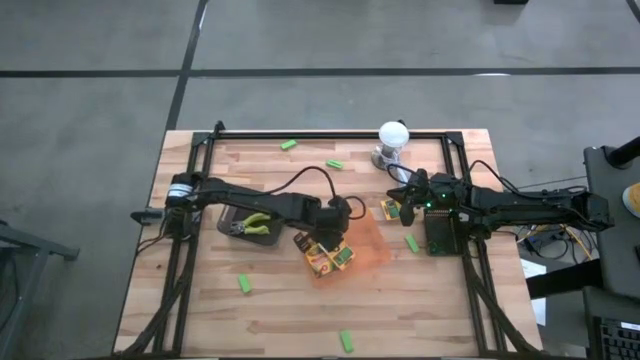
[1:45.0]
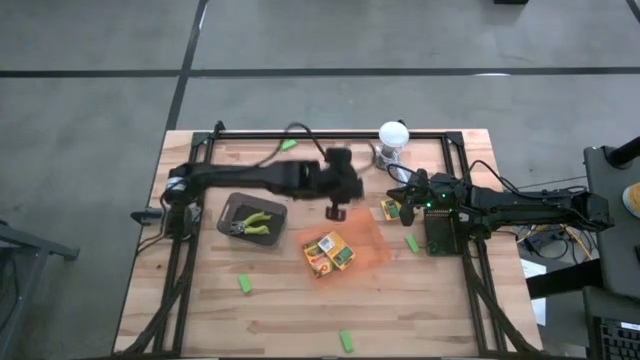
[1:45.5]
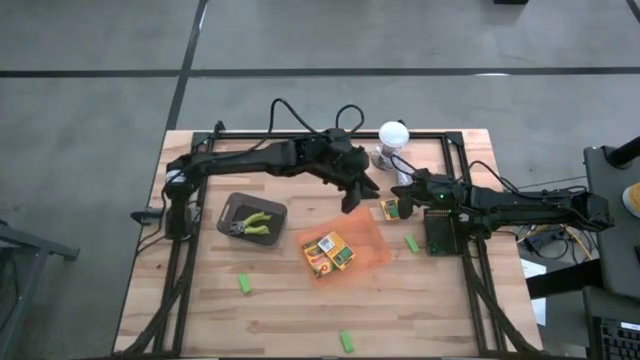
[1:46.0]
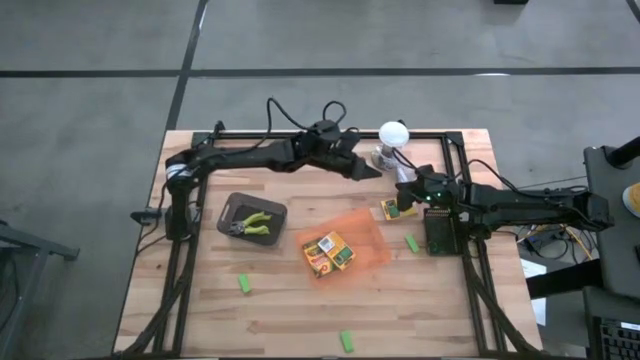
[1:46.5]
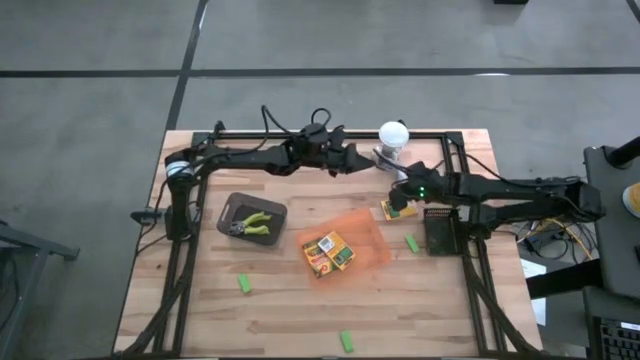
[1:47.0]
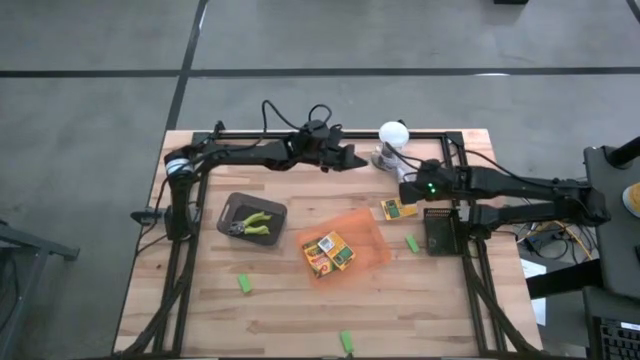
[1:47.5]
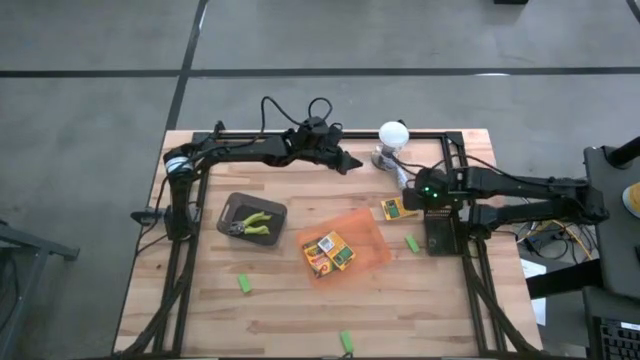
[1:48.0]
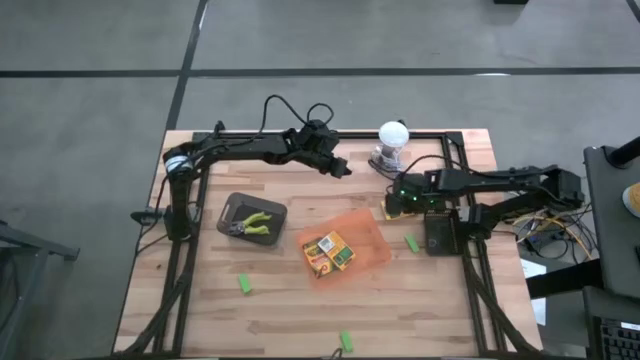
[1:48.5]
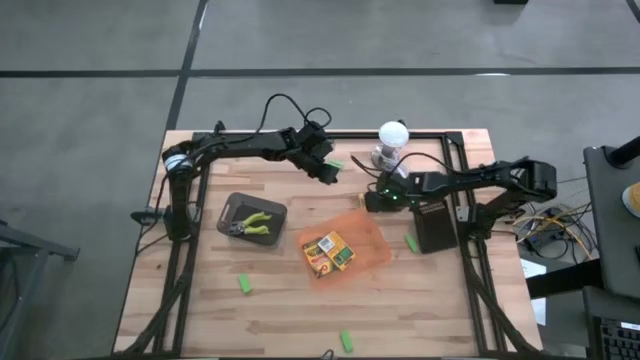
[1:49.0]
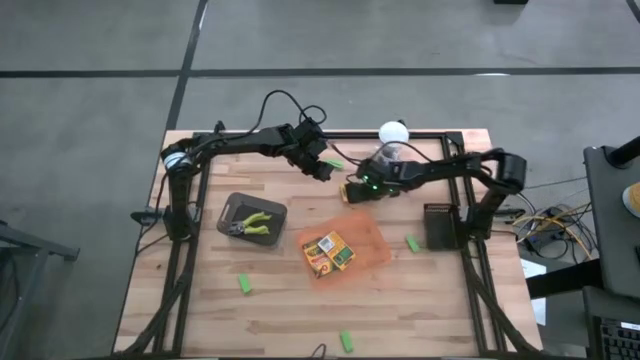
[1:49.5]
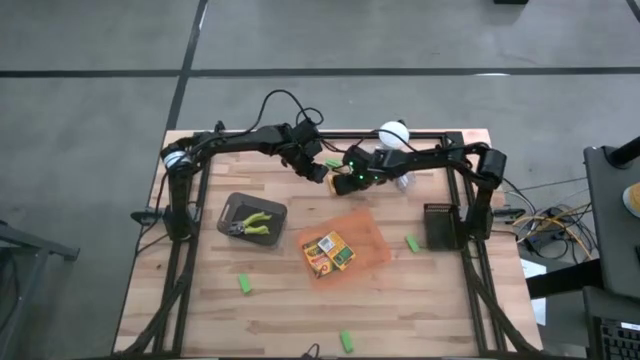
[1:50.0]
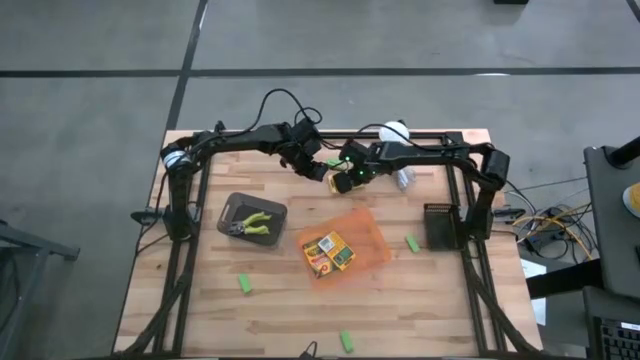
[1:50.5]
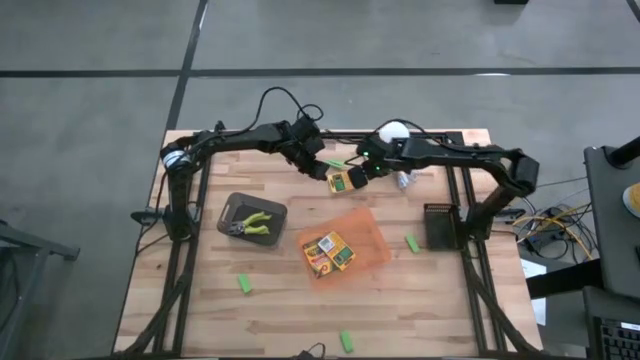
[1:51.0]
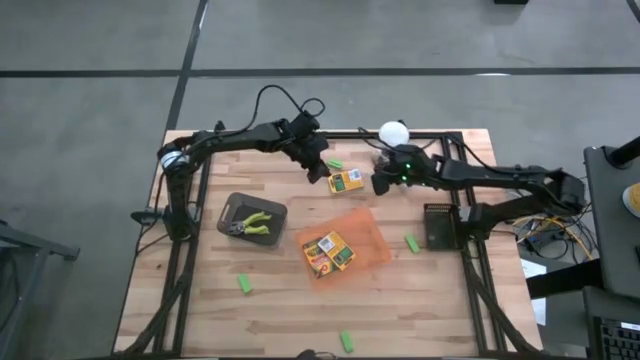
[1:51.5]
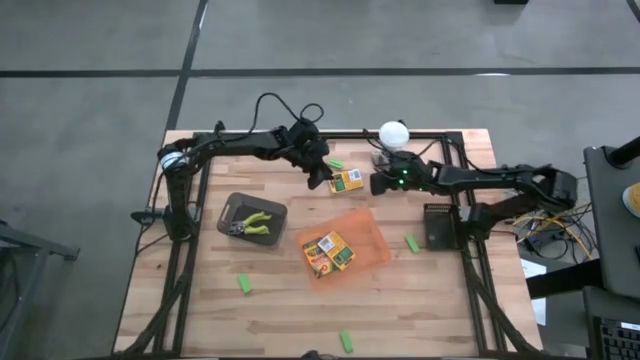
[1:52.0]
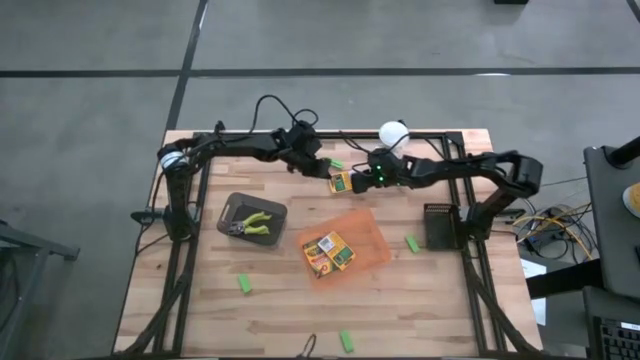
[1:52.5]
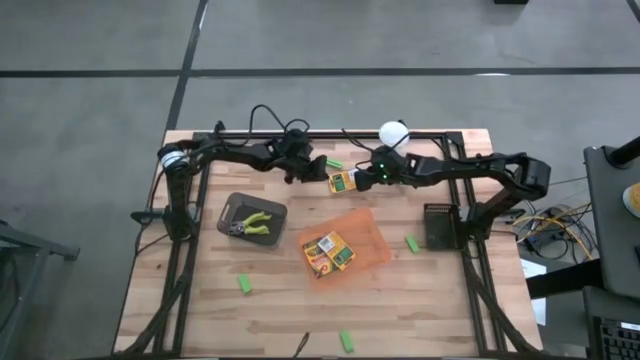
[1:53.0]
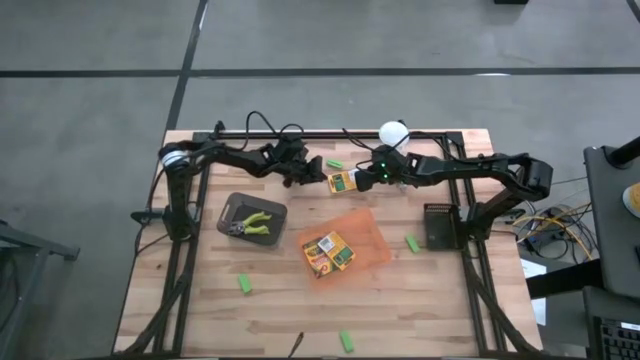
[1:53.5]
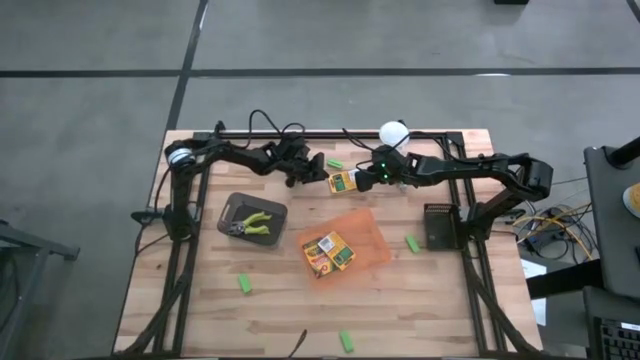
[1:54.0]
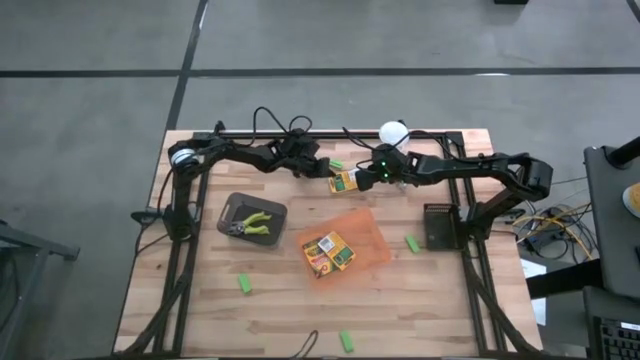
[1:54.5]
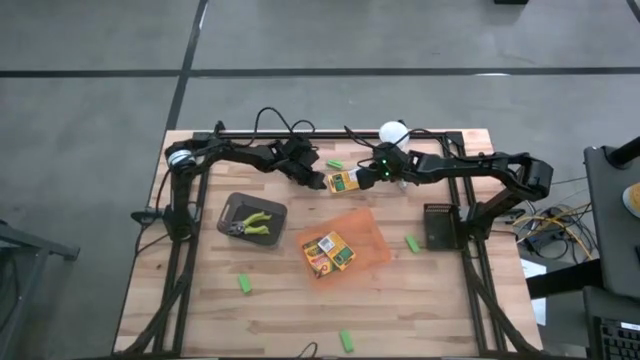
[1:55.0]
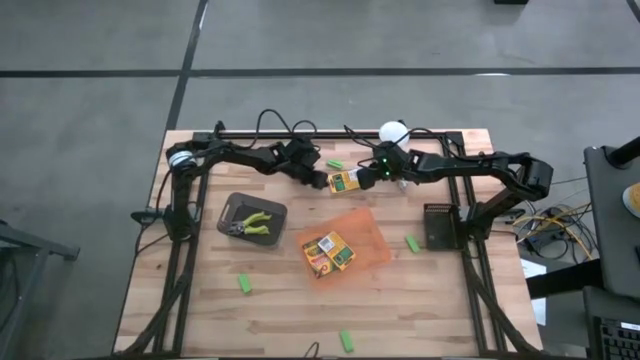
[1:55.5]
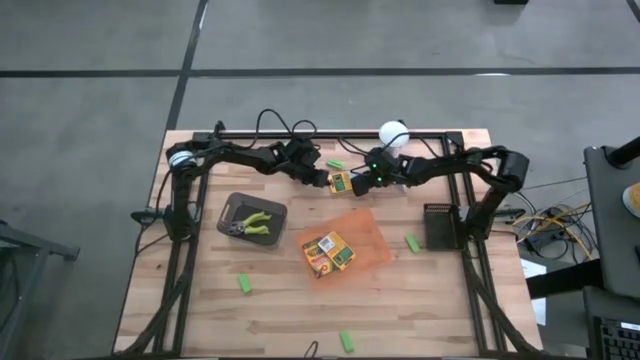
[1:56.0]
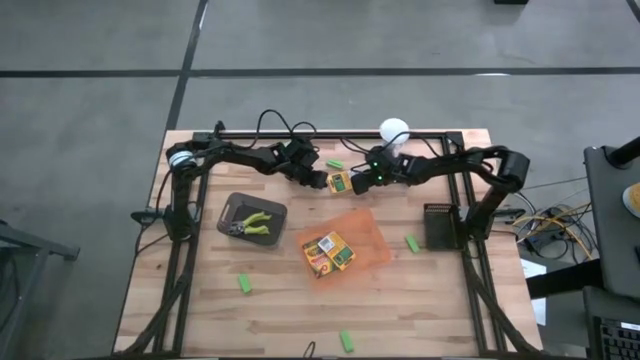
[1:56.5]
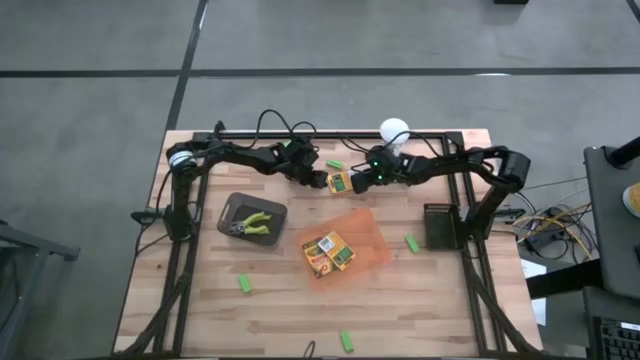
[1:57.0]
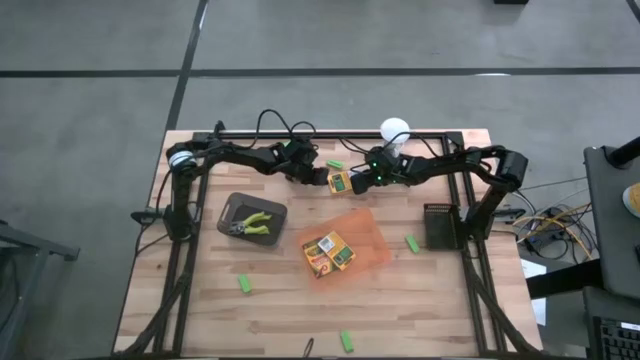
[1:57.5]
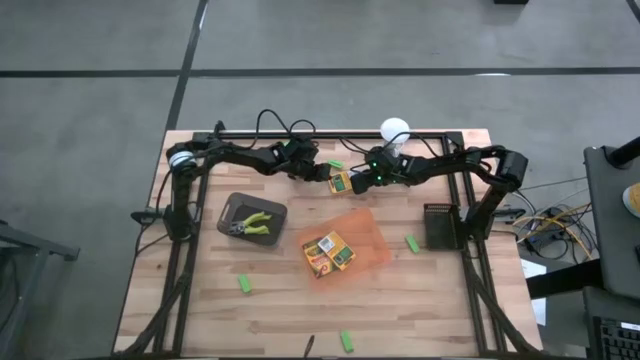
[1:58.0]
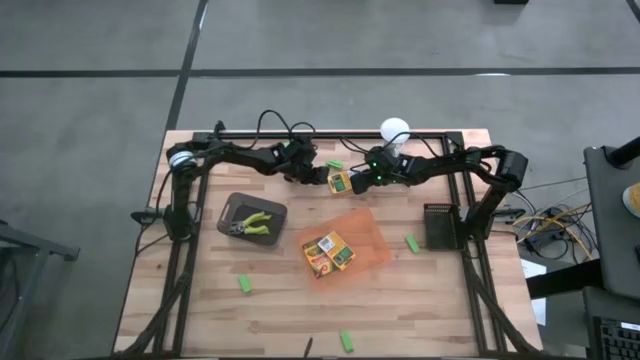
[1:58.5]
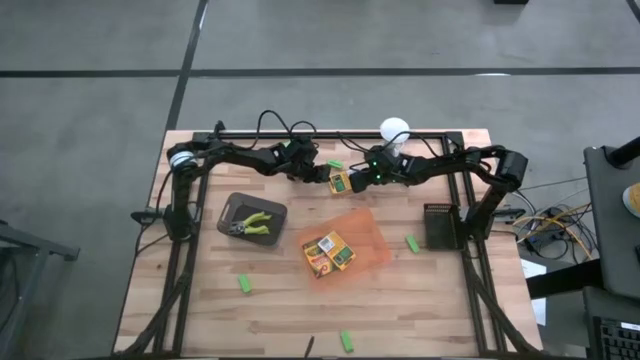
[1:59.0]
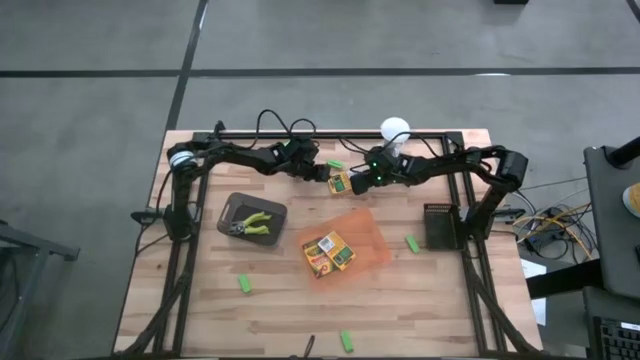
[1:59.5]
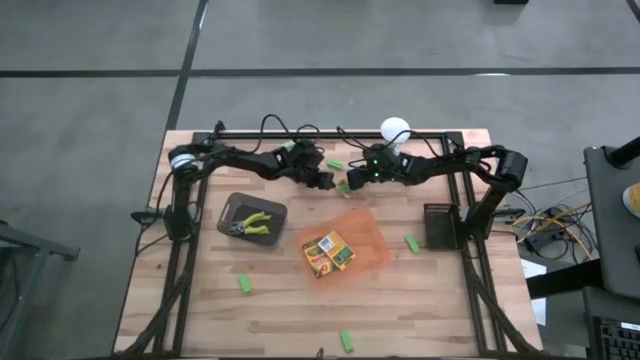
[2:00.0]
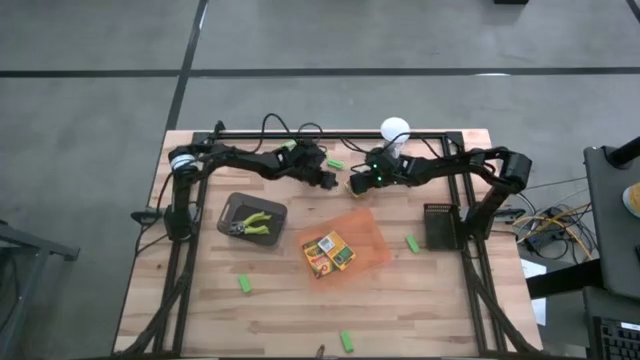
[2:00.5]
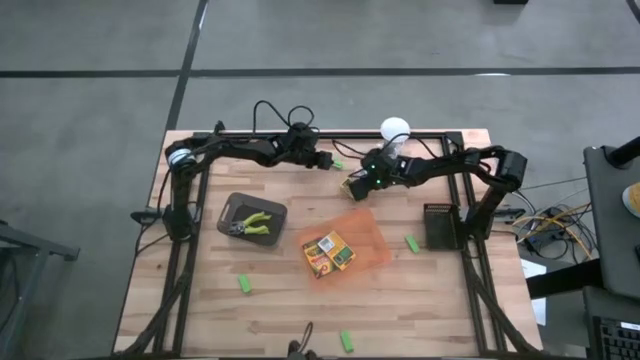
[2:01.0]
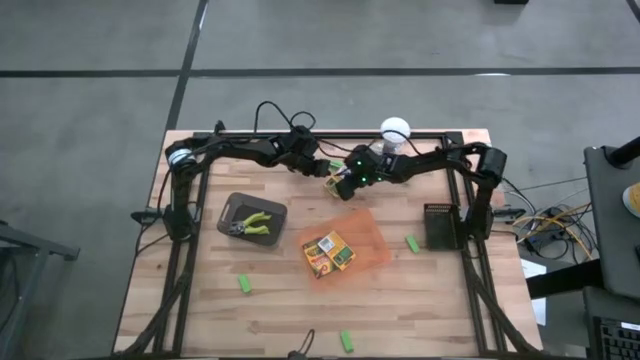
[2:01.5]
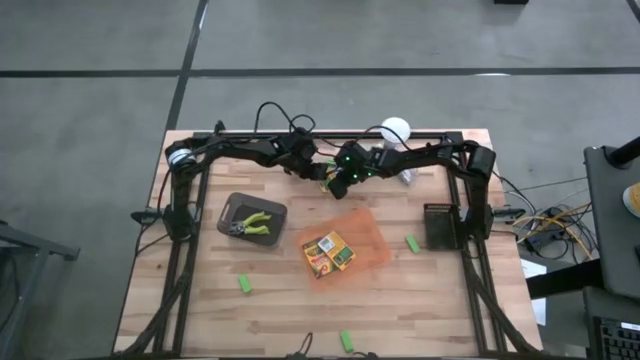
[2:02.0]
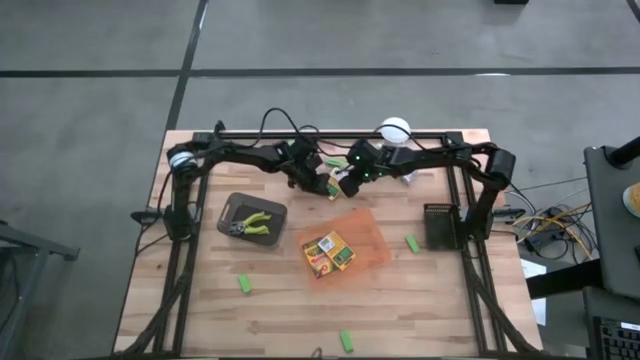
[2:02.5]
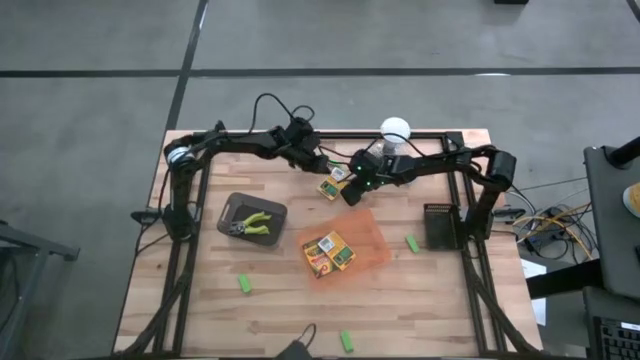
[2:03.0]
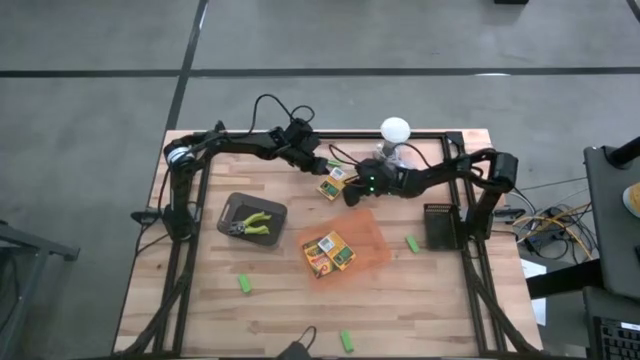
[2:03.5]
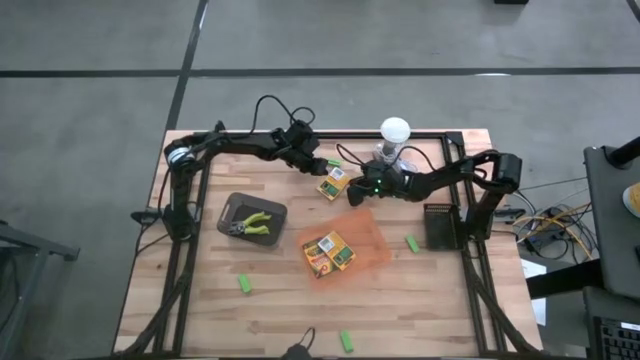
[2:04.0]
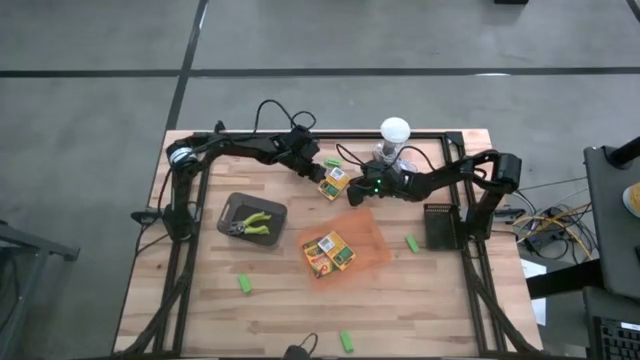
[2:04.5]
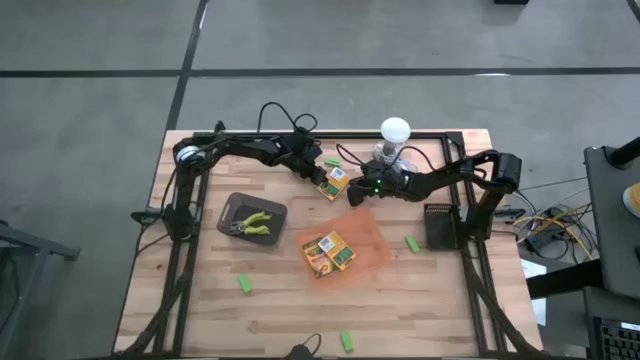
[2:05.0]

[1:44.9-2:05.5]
Task: Pick & Place School Supplies
Put the crayon box into the orange bin

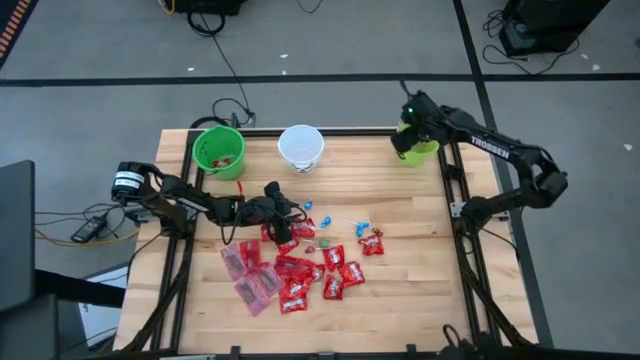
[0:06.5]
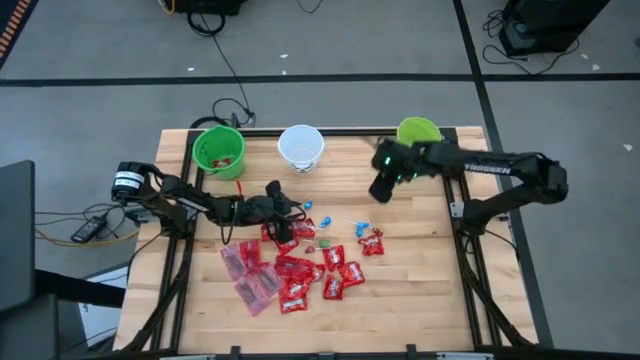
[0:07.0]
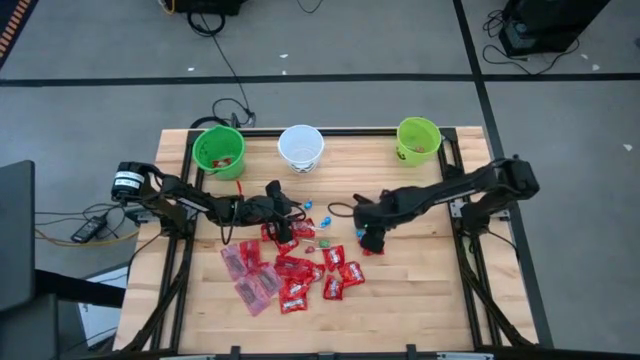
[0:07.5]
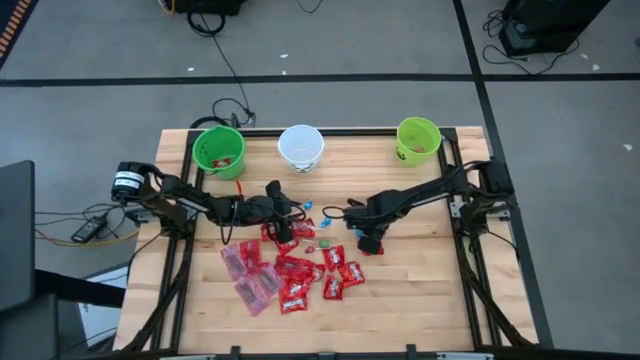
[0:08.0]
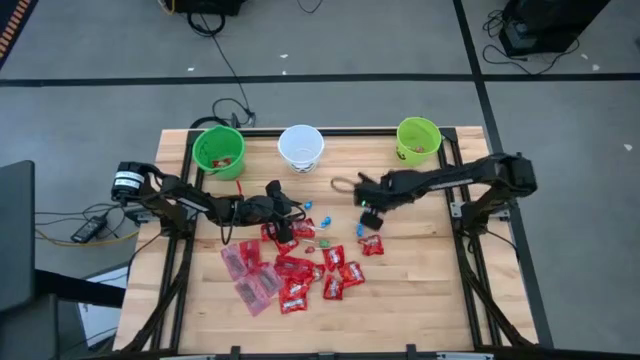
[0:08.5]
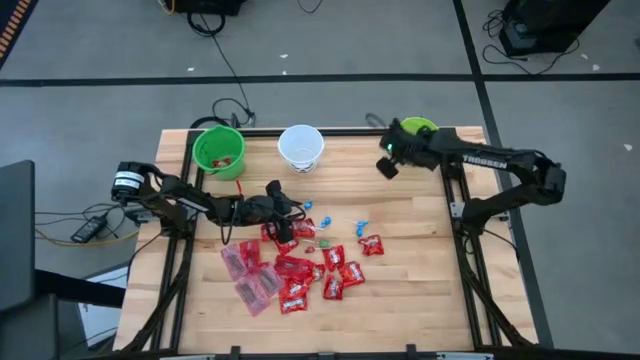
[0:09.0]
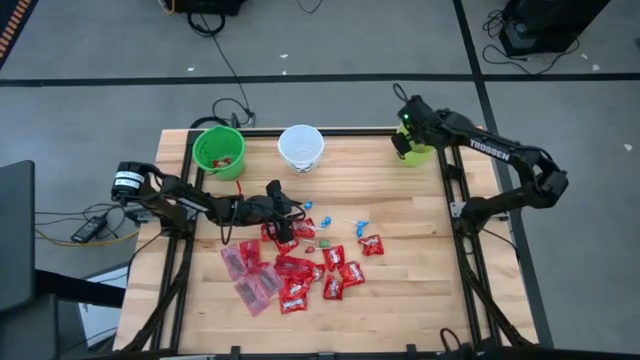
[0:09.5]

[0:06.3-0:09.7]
Task: Sort candy by brand, put in halloween buckets
Put the red lollipop into the light green bucket
